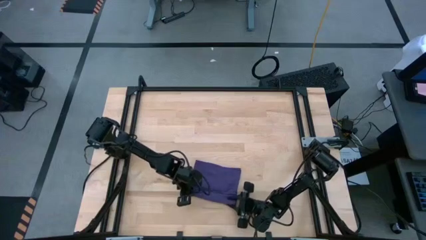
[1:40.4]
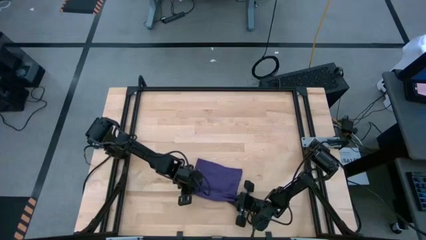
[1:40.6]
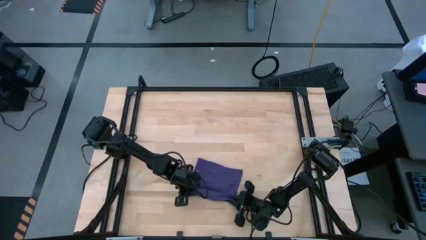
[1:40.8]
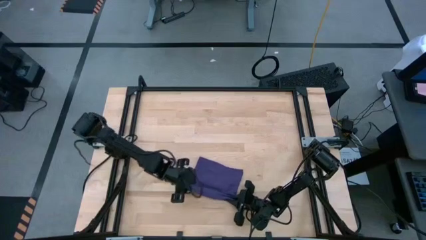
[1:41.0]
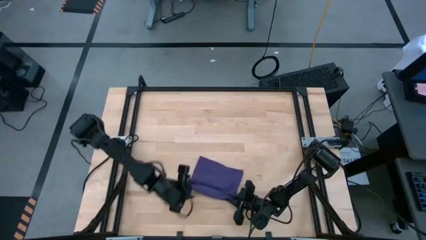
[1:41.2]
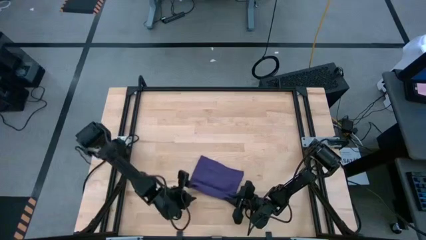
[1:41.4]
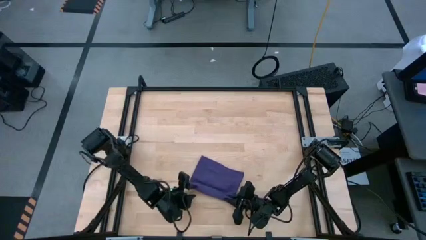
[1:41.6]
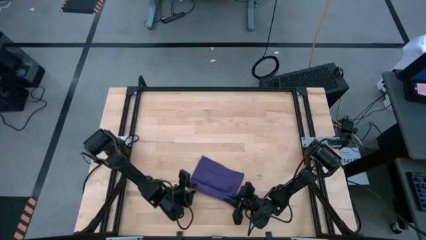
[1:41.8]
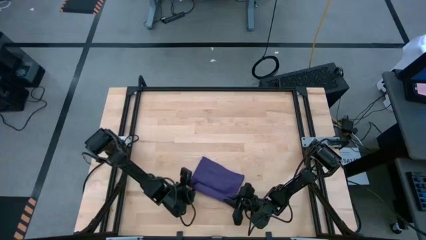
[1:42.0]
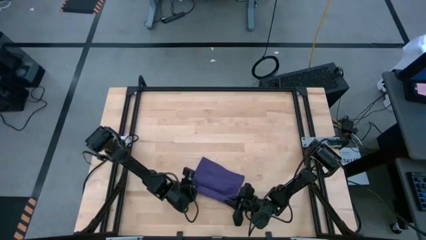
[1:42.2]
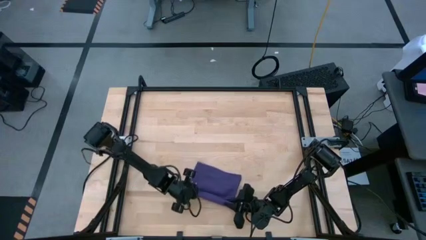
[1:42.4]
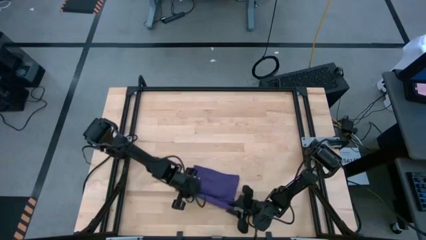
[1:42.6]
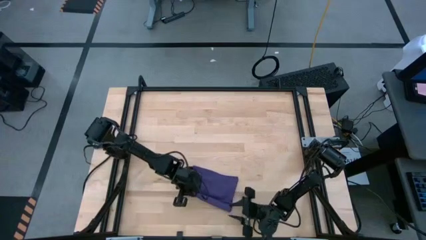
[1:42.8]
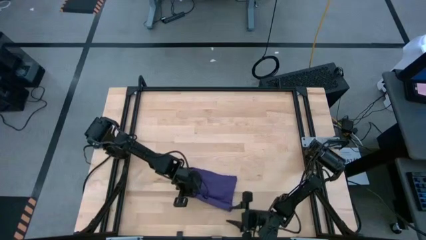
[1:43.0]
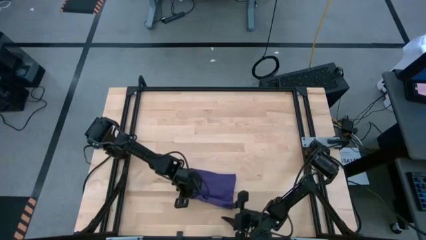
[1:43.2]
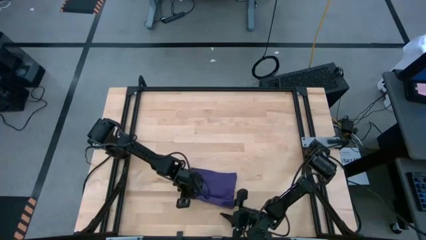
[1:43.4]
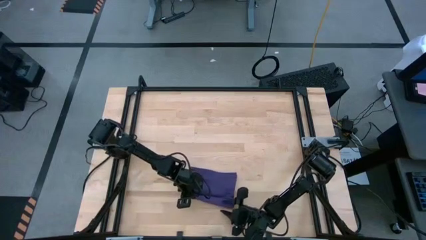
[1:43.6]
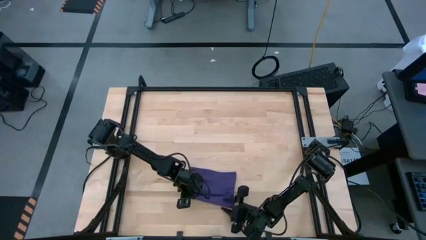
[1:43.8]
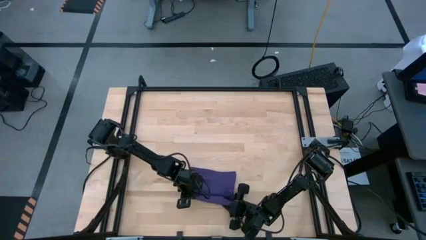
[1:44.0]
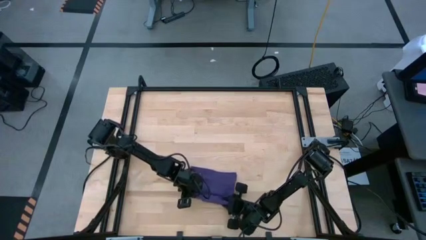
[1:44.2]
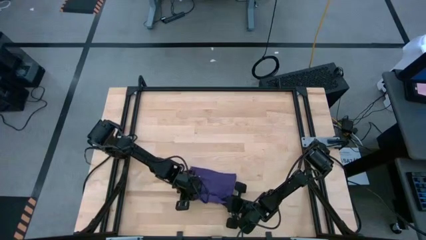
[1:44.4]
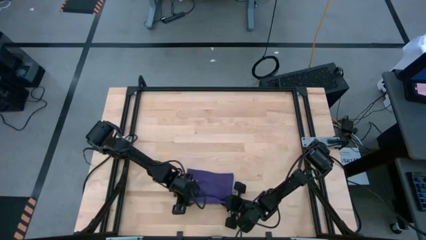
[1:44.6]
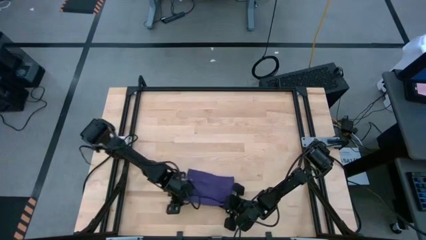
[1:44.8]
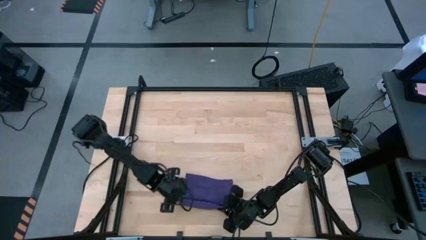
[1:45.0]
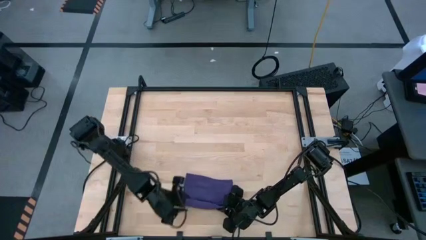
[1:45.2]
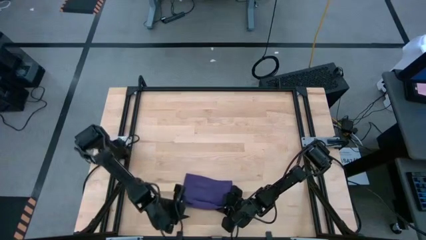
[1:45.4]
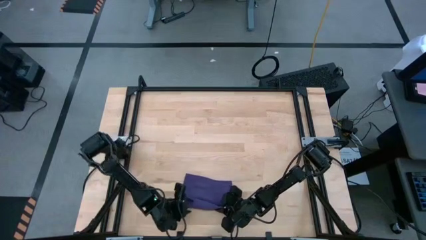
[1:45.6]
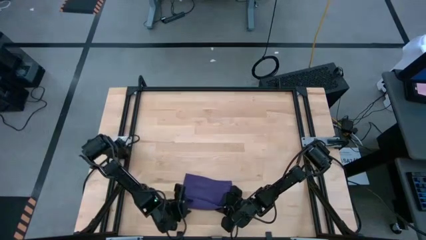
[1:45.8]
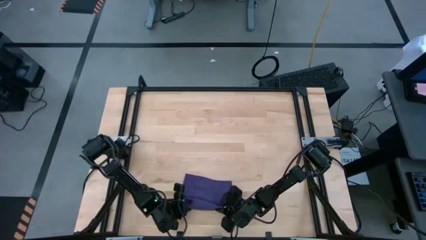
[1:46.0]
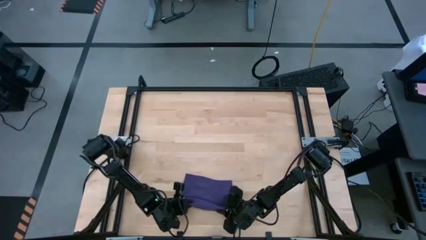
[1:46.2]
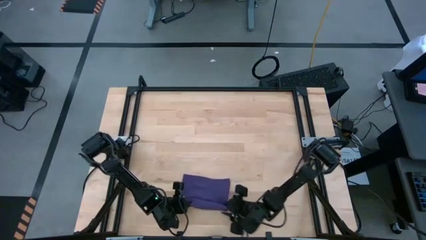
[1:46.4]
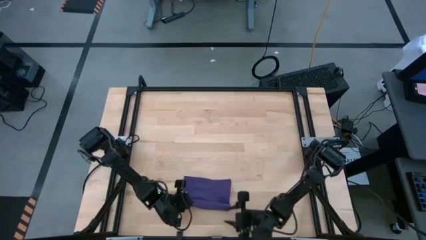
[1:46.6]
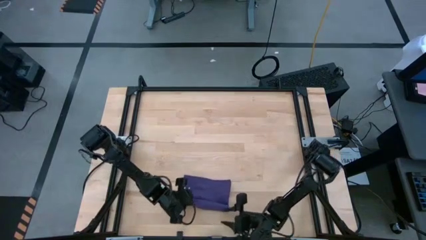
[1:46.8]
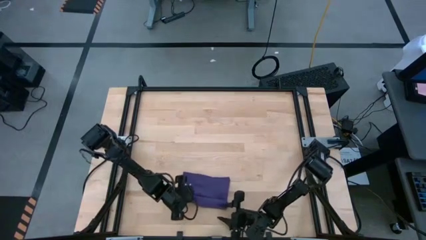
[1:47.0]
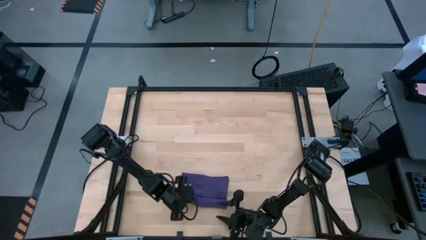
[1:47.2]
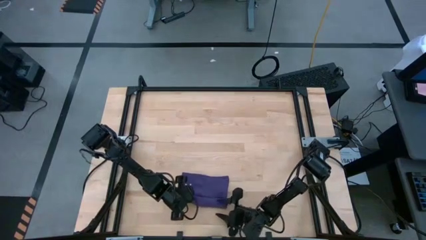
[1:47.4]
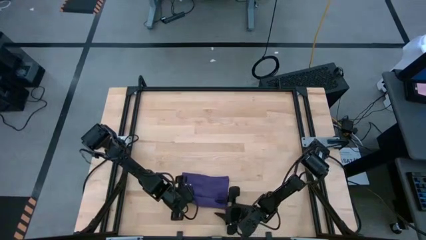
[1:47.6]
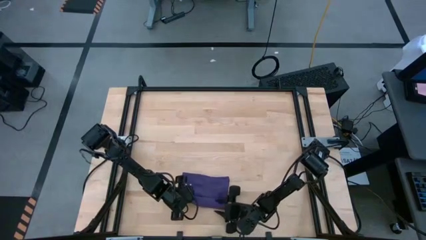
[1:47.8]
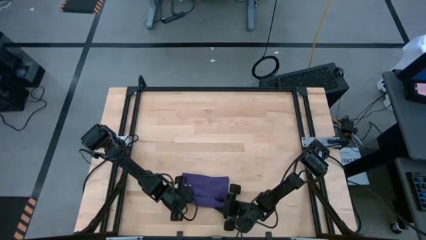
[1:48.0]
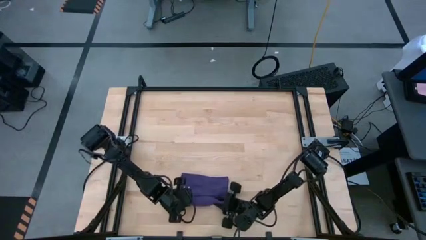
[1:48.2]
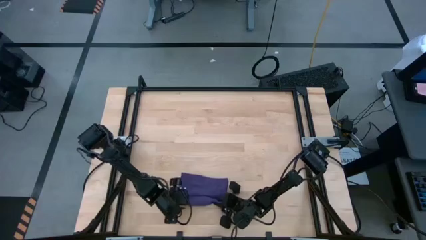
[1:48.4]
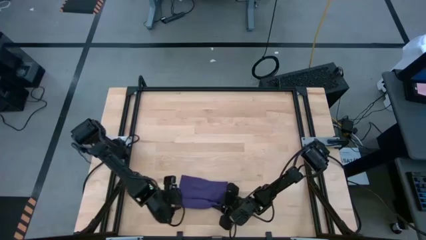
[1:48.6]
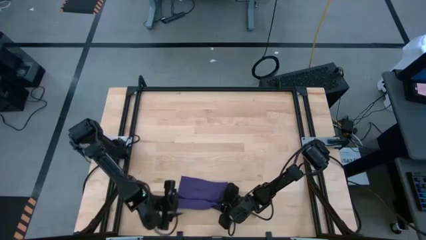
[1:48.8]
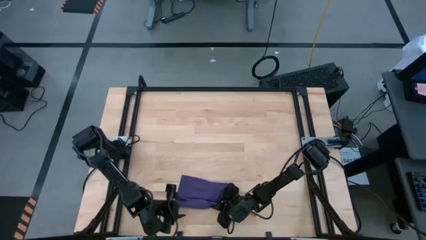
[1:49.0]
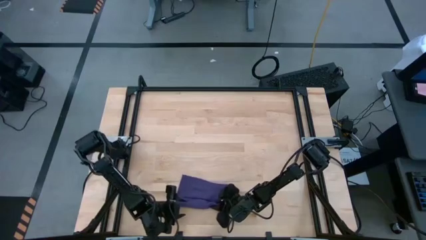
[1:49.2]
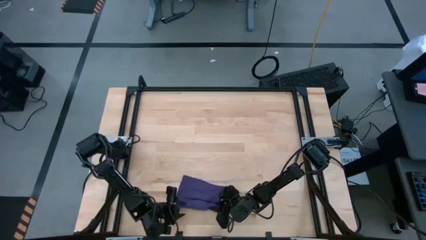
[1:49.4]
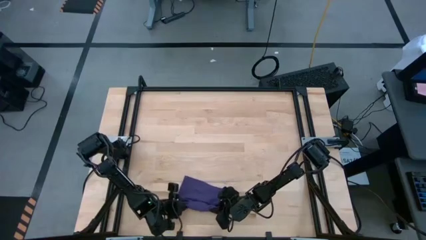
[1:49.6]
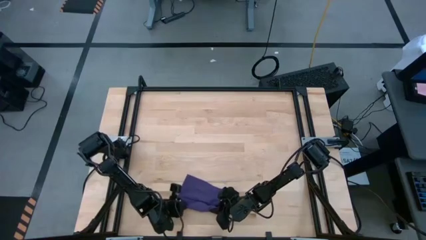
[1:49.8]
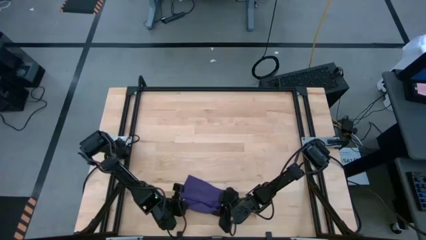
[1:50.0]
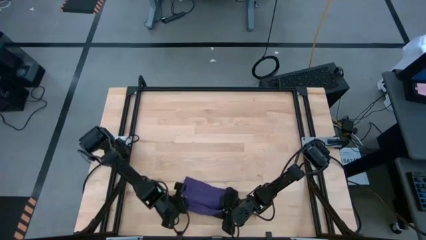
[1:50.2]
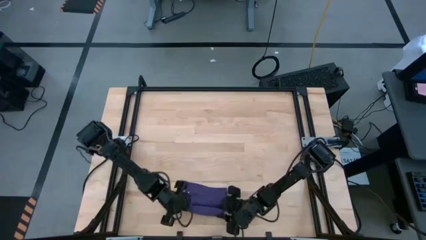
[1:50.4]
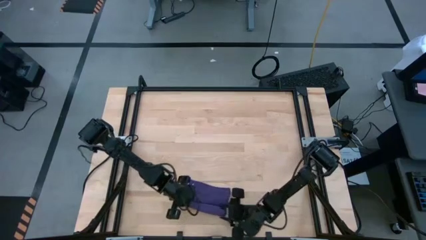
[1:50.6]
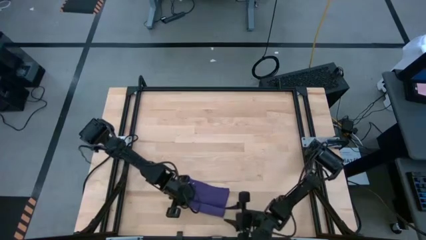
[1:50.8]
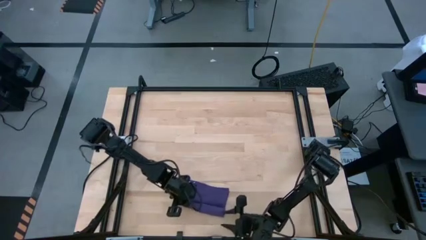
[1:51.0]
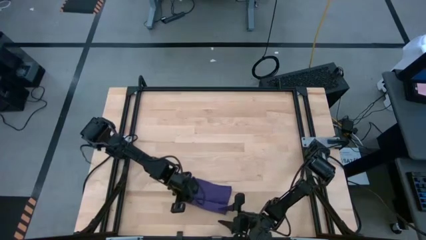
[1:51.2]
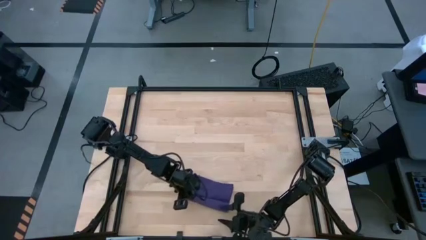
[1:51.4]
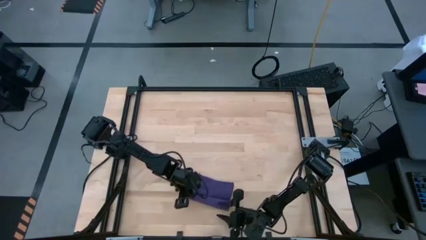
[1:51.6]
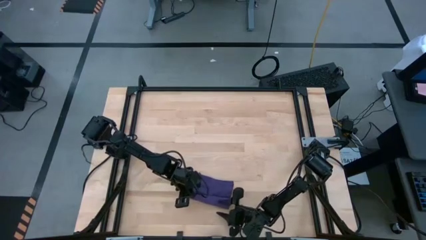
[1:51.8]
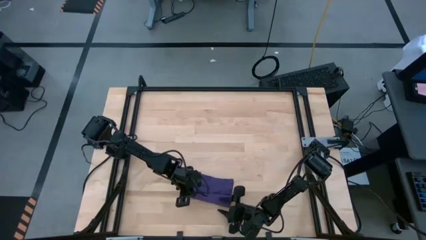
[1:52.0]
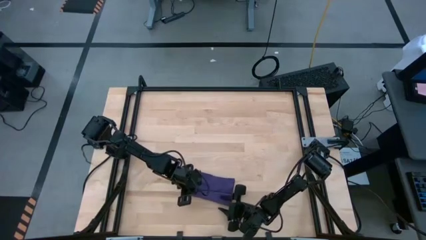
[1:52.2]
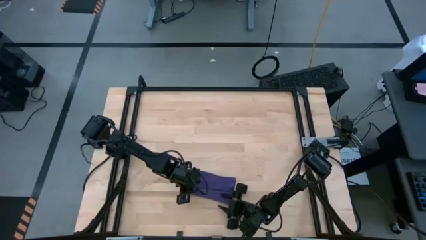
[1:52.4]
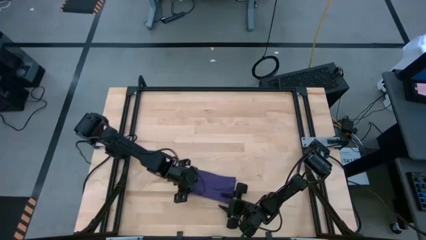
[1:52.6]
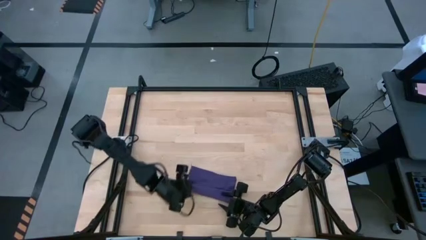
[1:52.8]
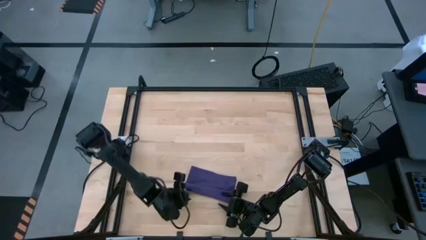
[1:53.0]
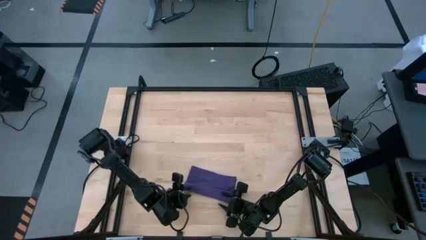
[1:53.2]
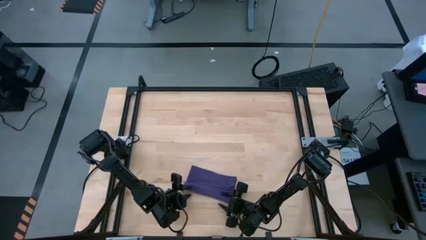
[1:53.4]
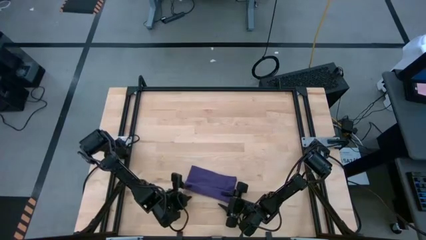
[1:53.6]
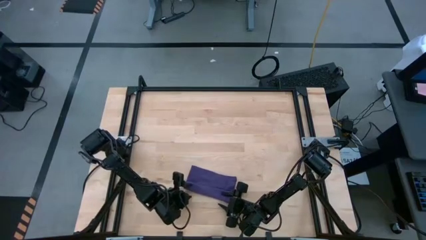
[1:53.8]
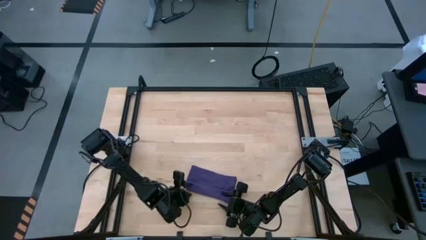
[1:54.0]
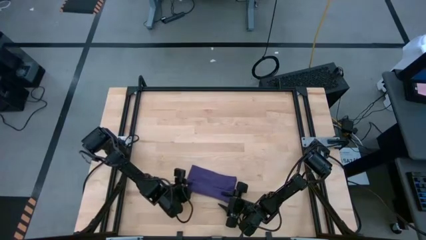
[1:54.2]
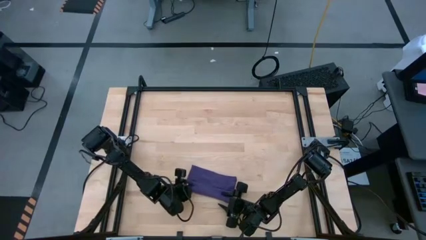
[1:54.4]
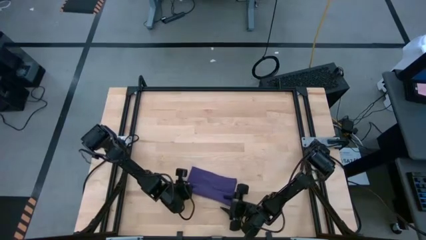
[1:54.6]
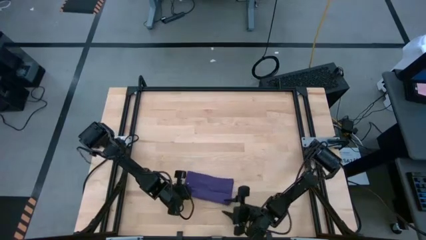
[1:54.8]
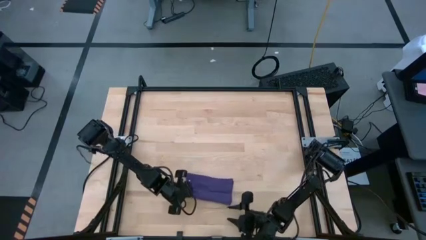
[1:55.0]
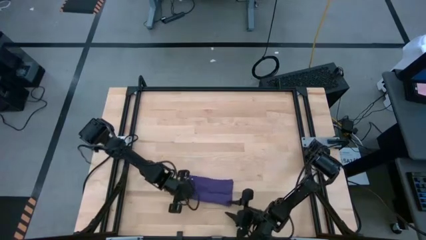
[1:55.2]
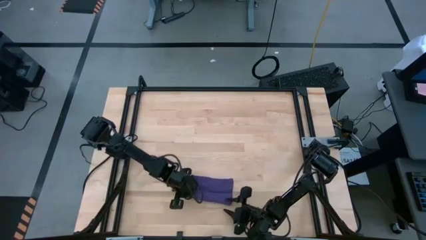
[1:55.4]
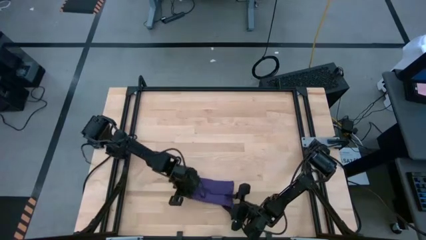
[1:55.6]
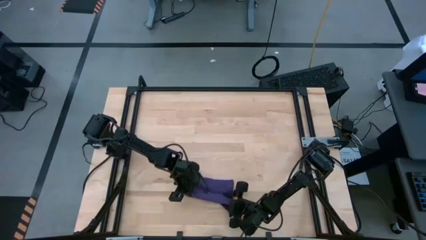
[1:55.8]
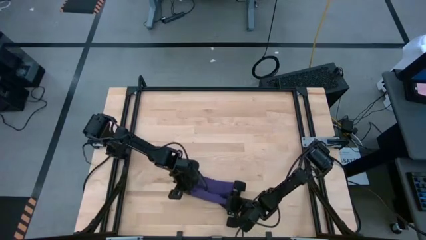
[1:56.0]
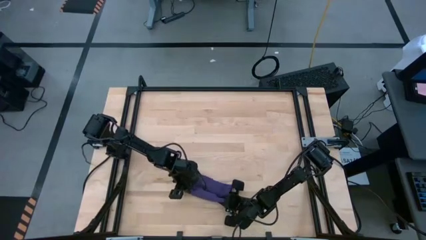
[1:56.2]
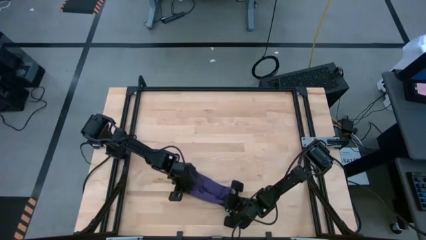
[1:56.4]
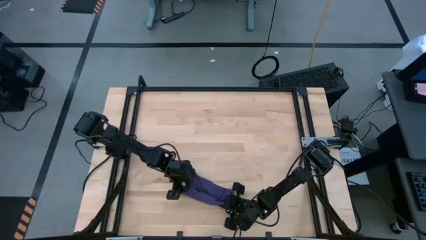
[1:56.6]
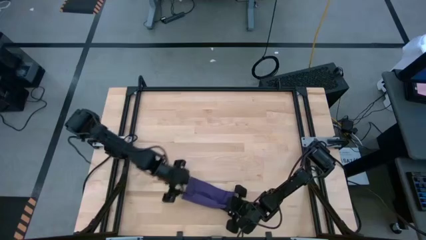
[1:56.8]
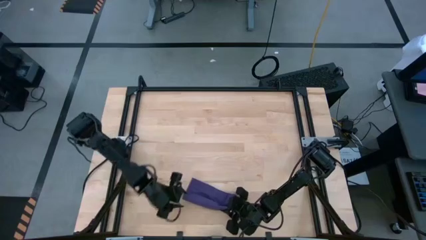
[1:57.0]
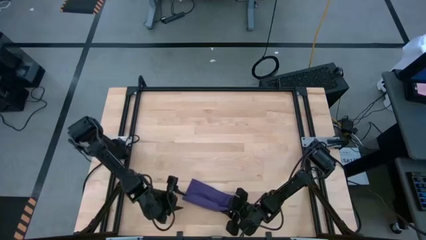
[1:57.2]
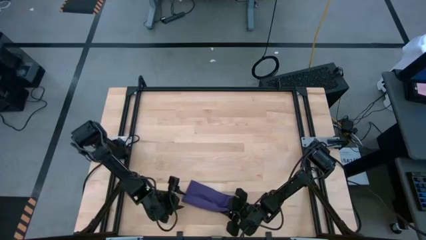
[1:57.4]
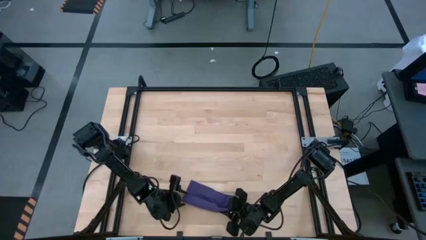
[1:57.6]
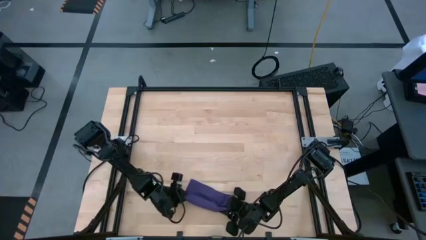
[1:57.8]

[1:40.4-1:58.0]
Task: Roll towel
Roll the purple towel
